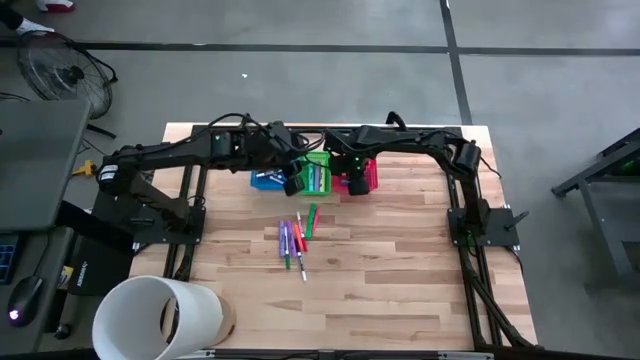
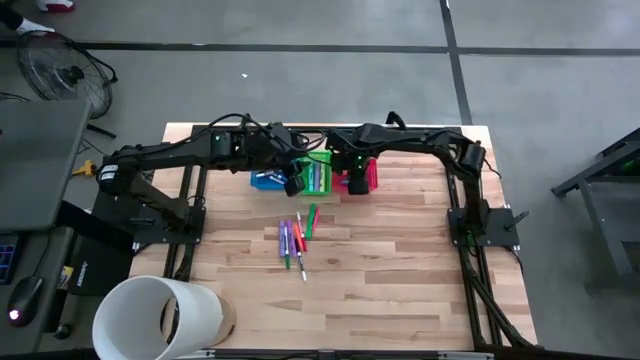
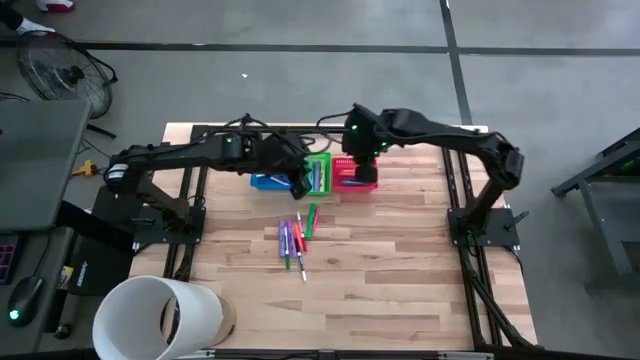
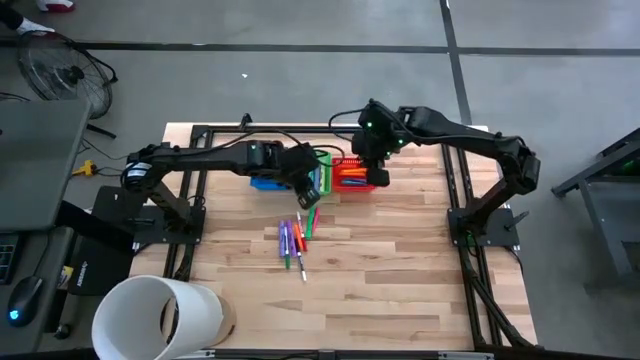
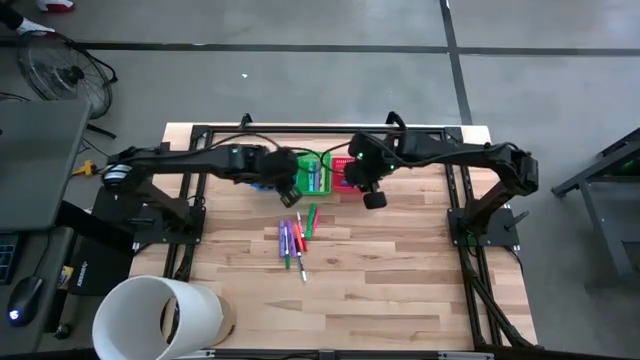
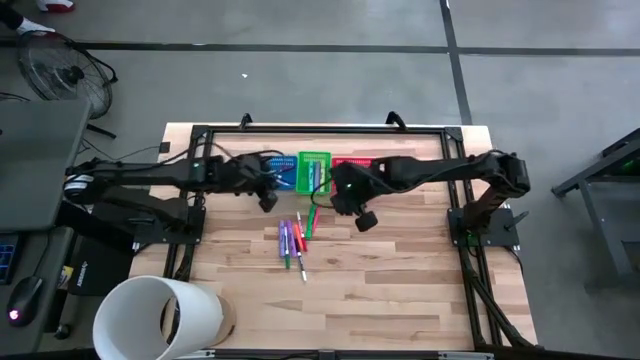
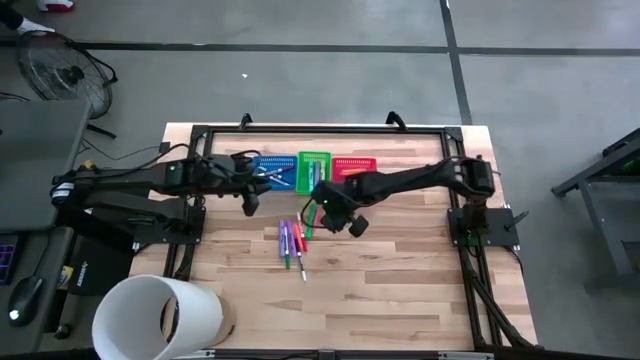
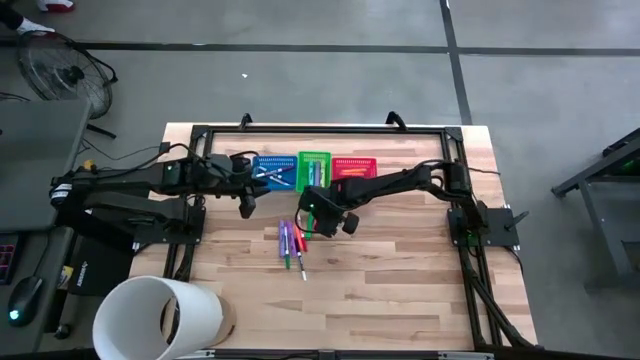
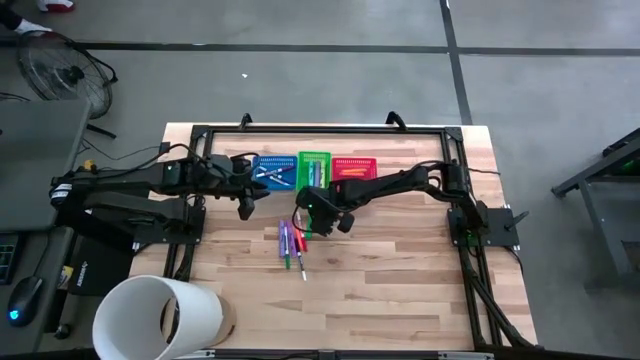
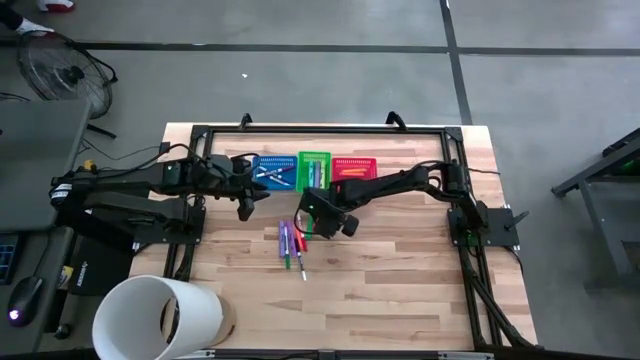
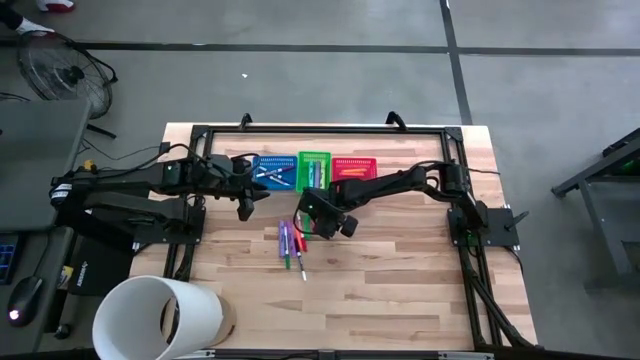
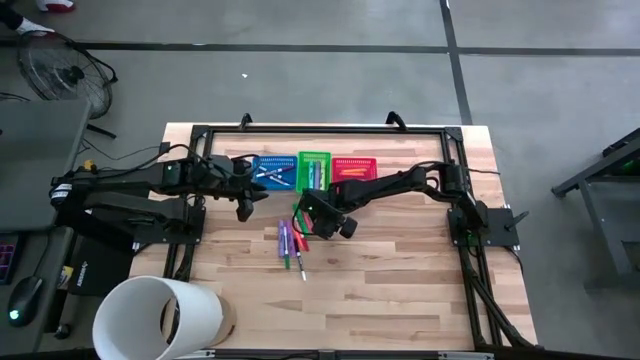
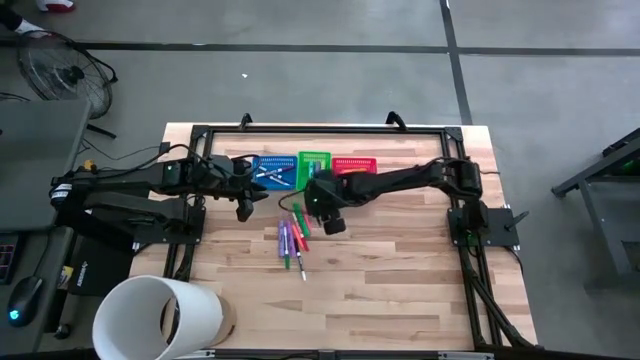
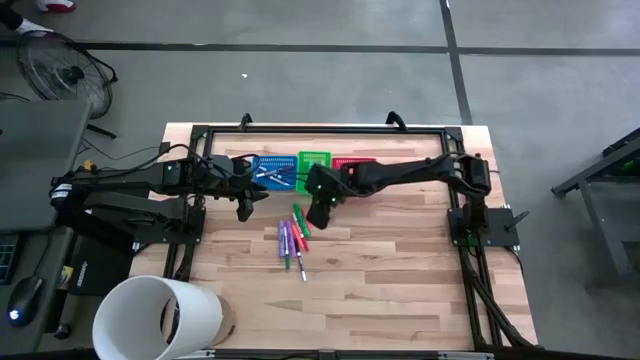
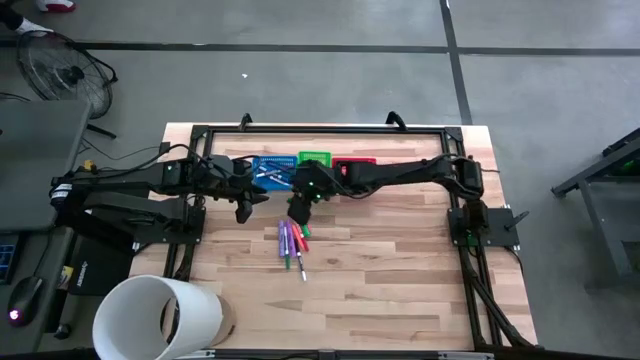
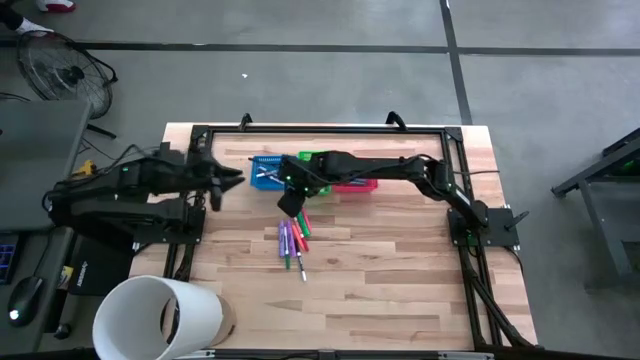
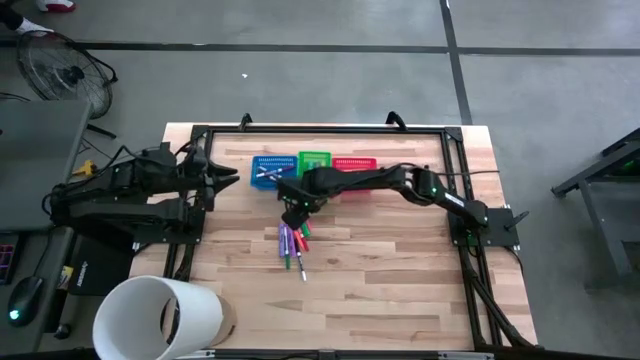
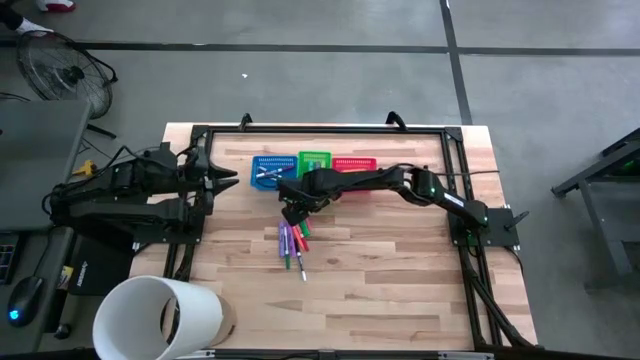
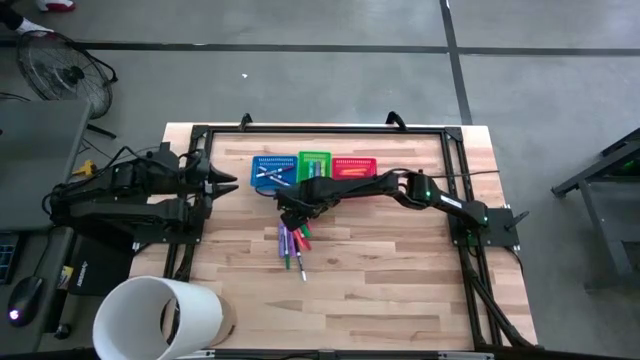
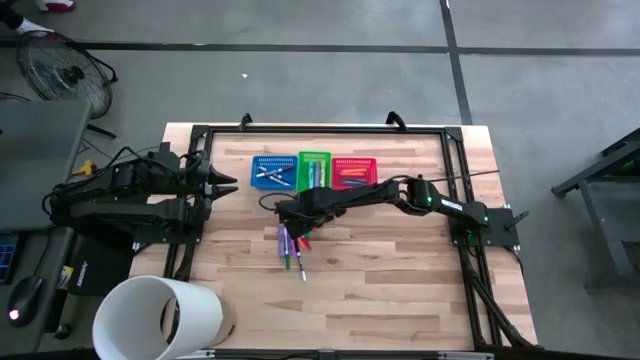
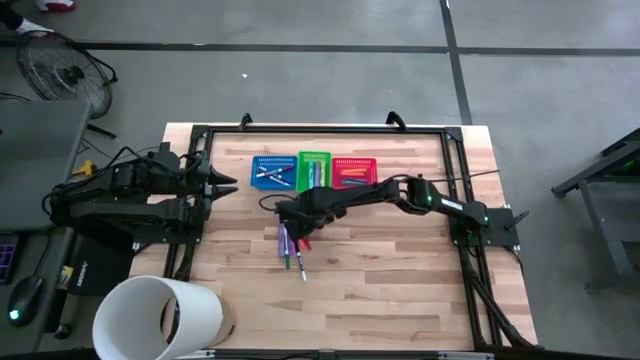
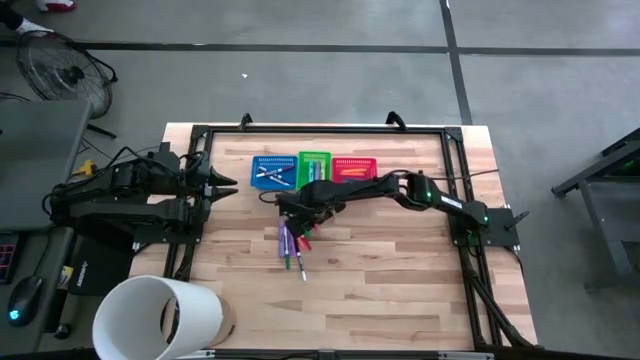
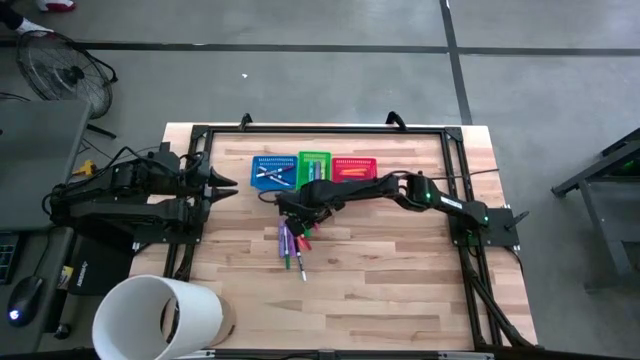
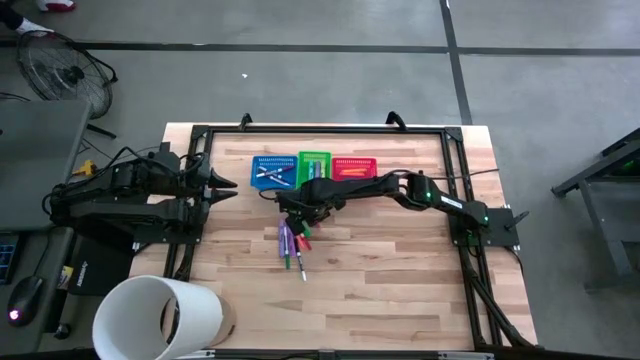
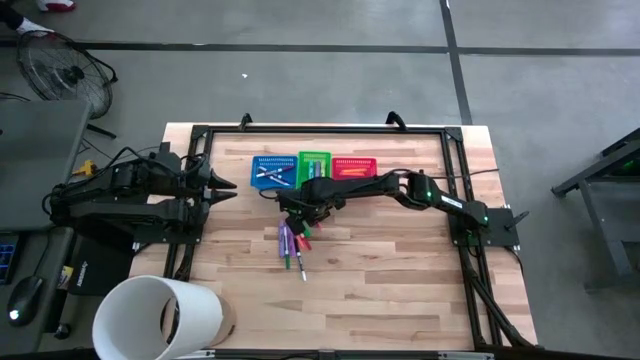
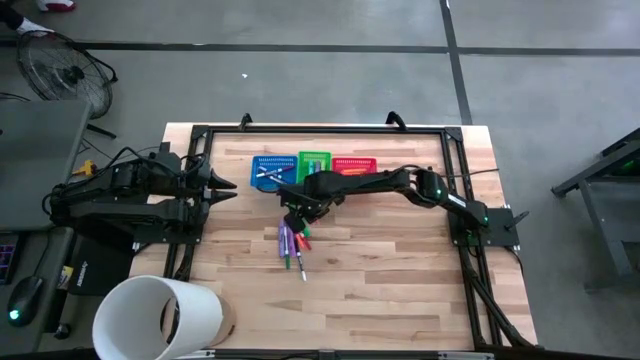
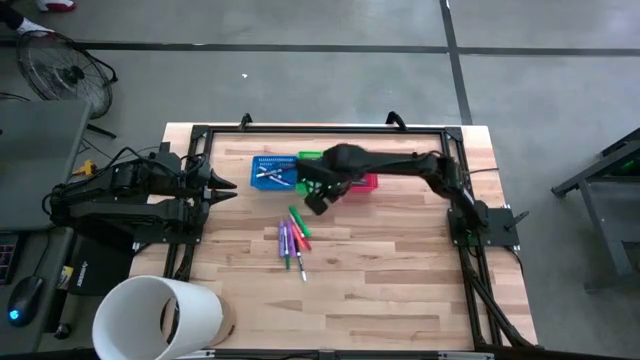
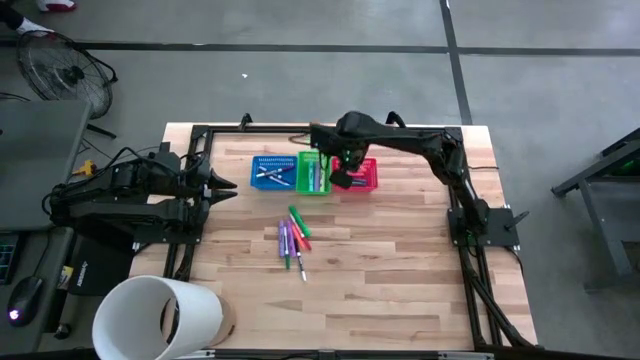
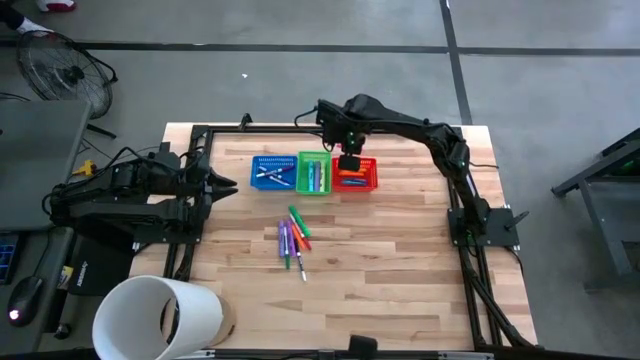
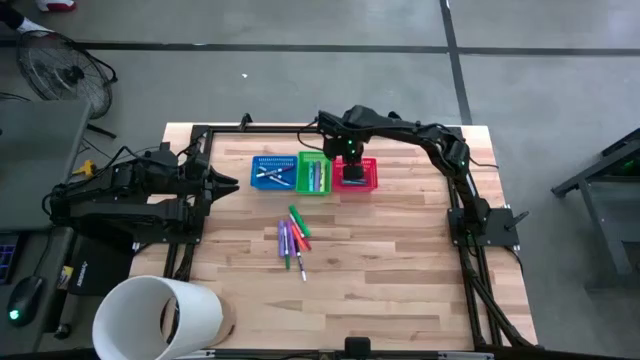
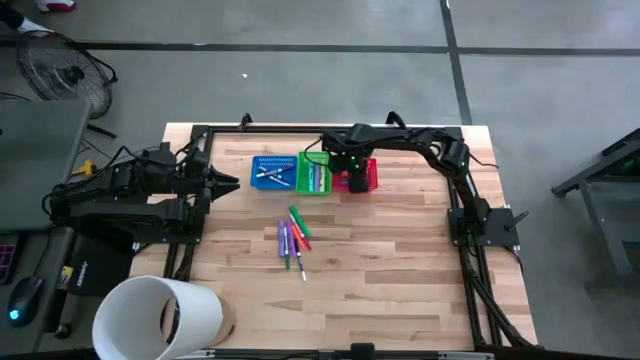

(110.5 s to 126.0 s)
Task: Pick & Place Markers
Put the pink pen into the red bin

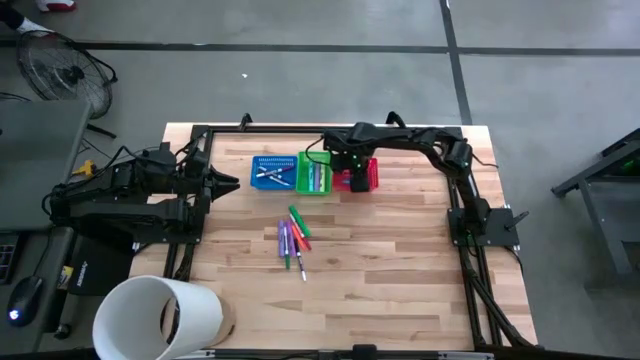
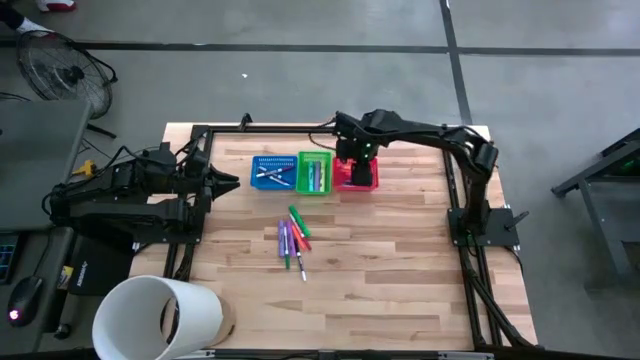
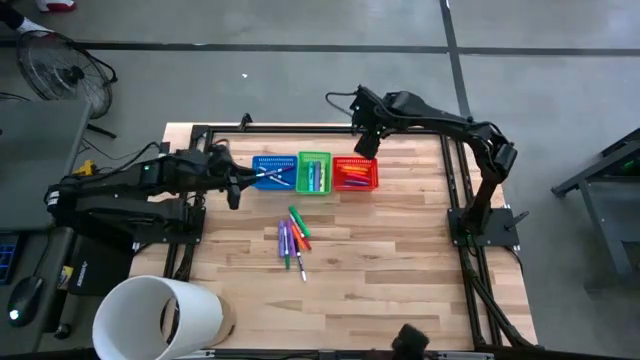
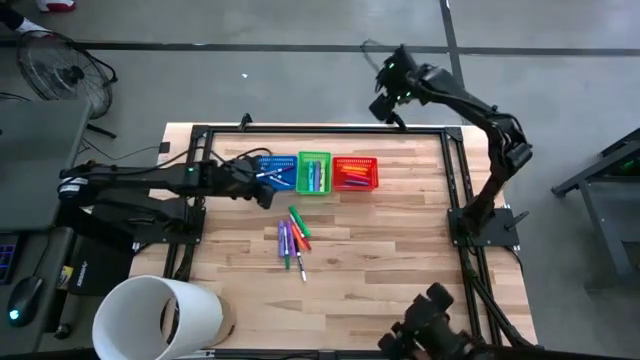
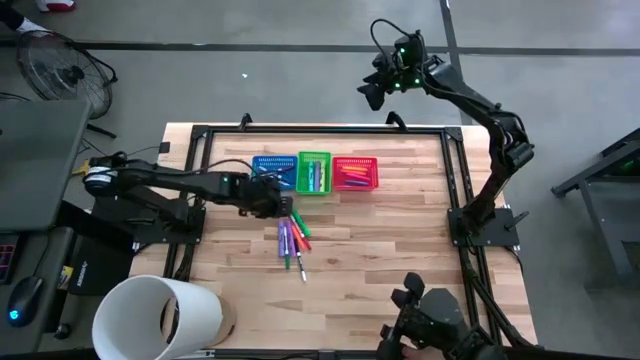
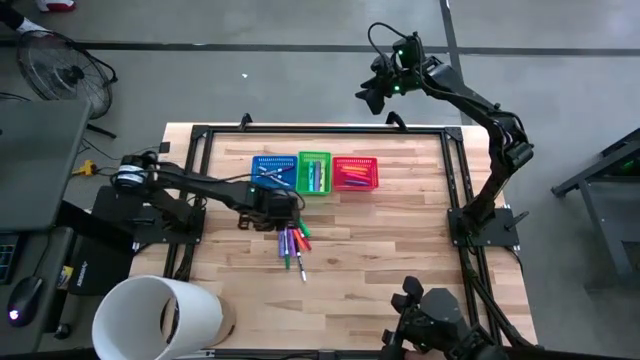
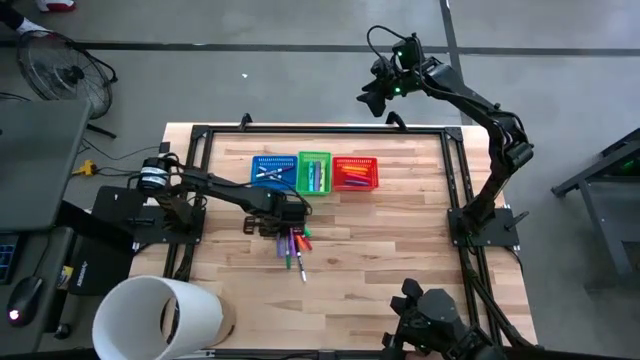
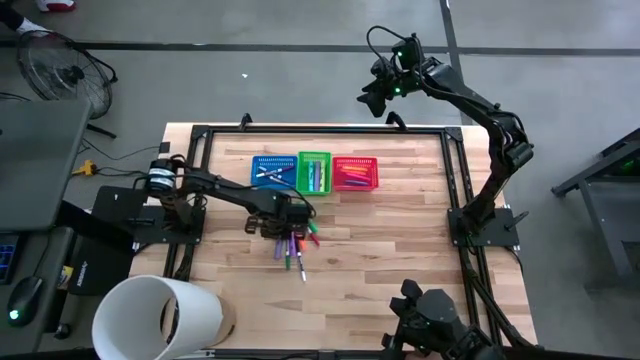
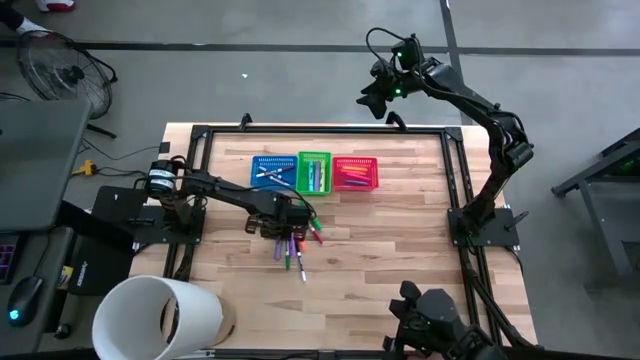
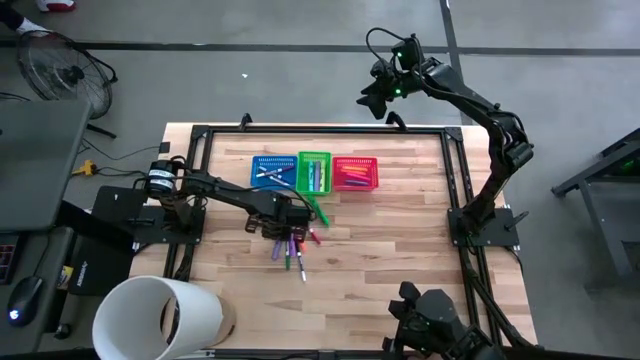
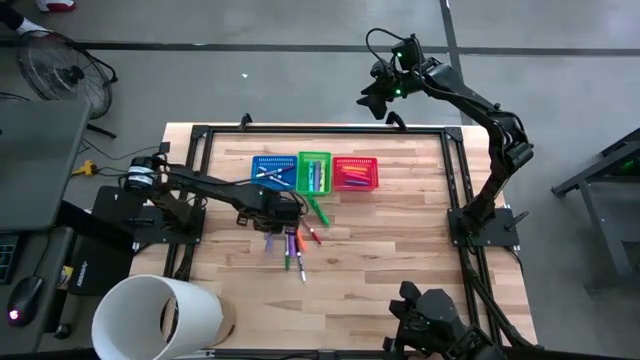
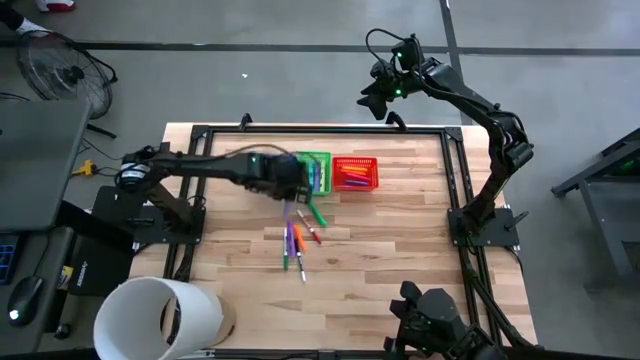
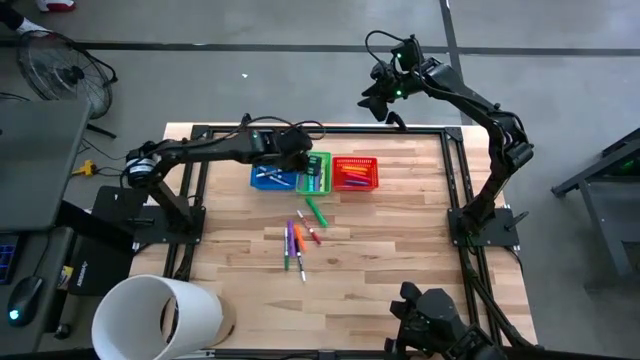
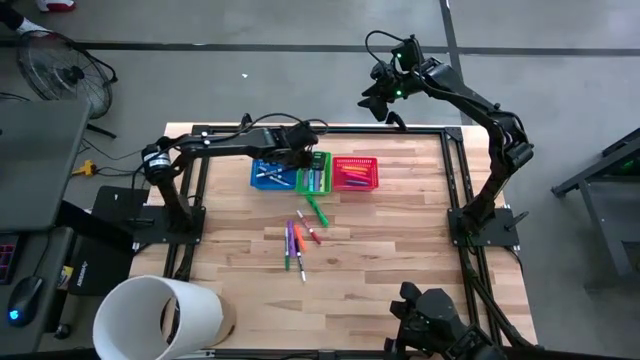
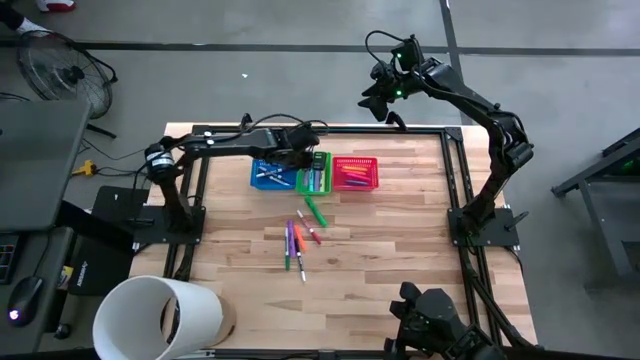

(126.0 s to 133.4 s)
Put the left purple highlighter into the green bin
